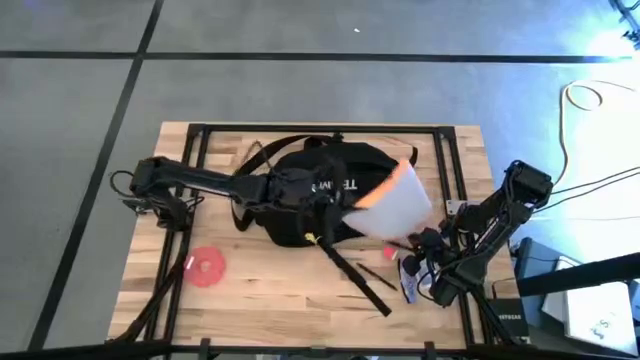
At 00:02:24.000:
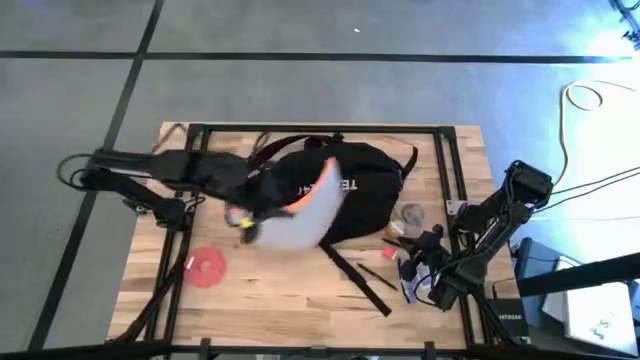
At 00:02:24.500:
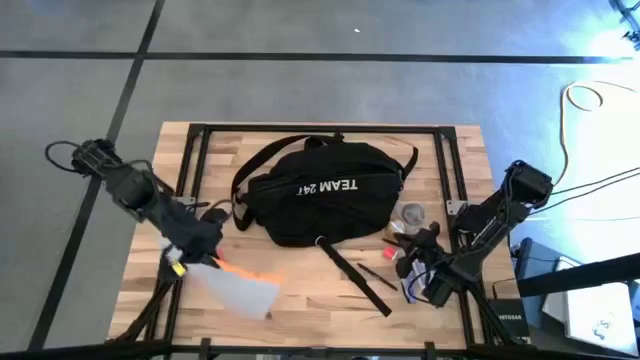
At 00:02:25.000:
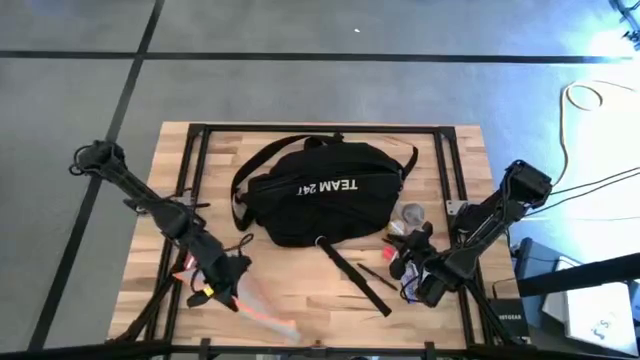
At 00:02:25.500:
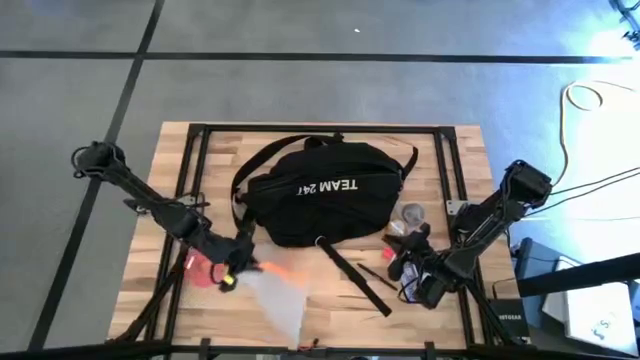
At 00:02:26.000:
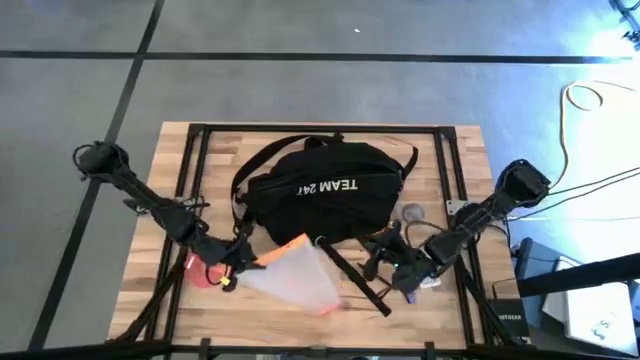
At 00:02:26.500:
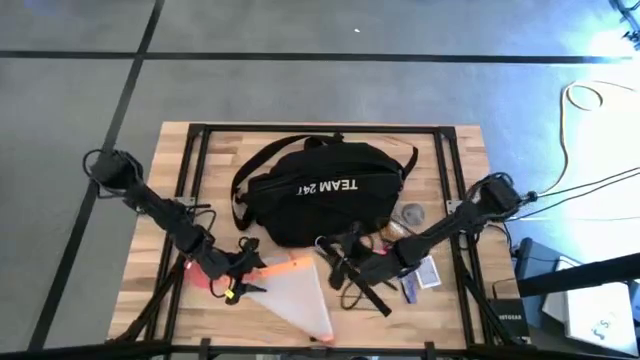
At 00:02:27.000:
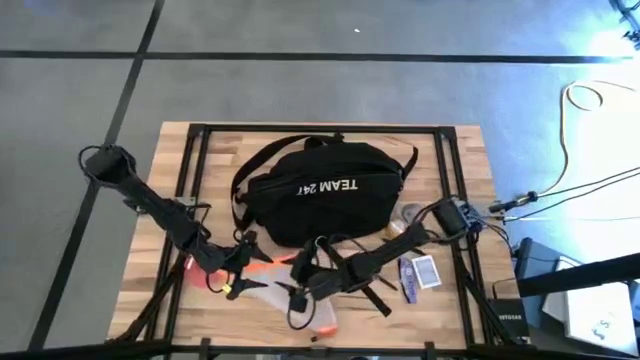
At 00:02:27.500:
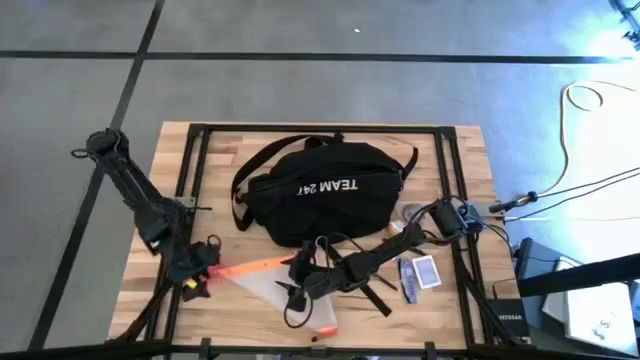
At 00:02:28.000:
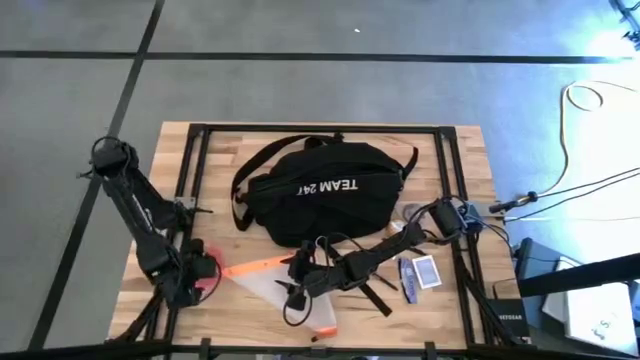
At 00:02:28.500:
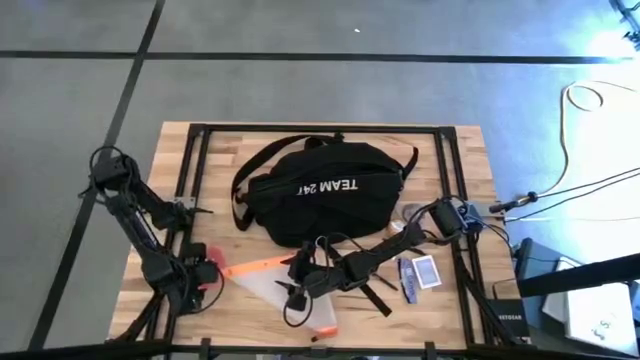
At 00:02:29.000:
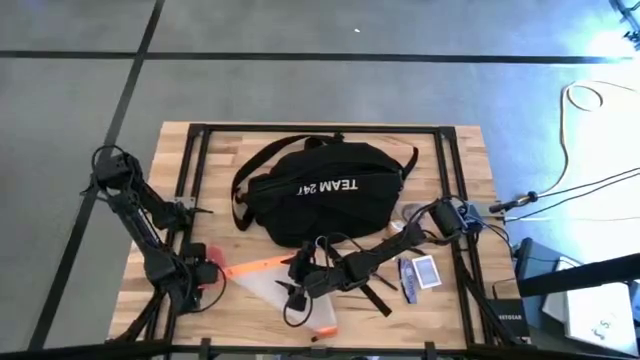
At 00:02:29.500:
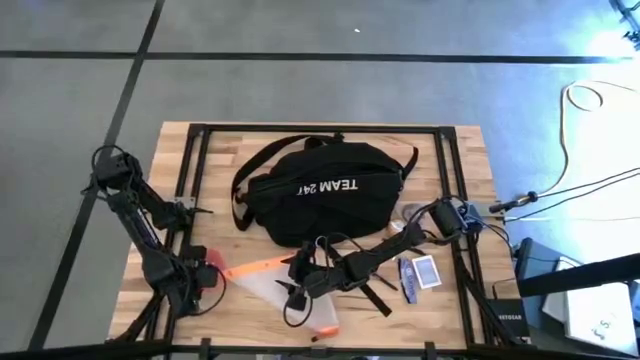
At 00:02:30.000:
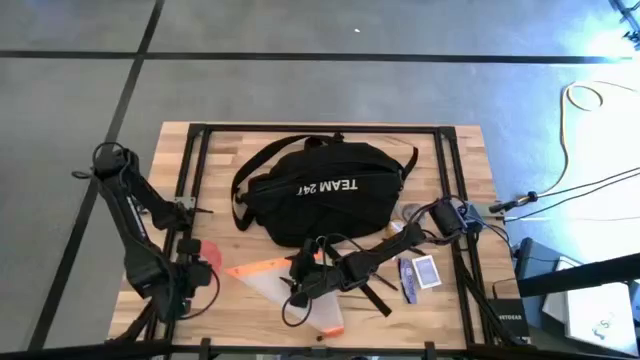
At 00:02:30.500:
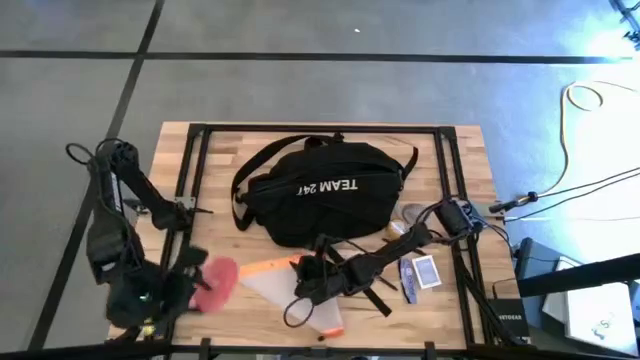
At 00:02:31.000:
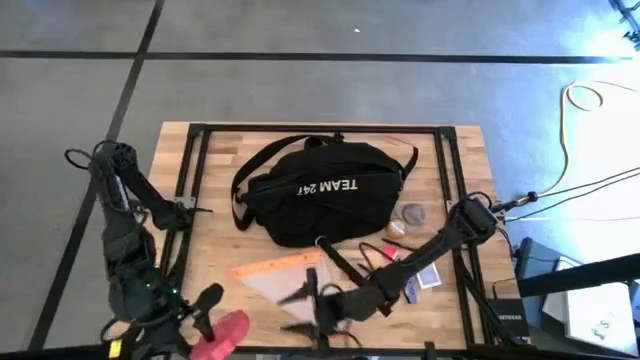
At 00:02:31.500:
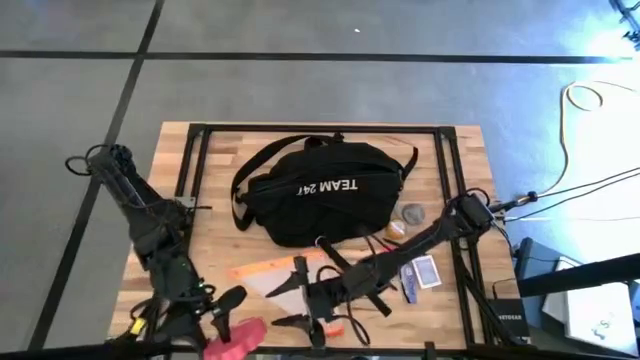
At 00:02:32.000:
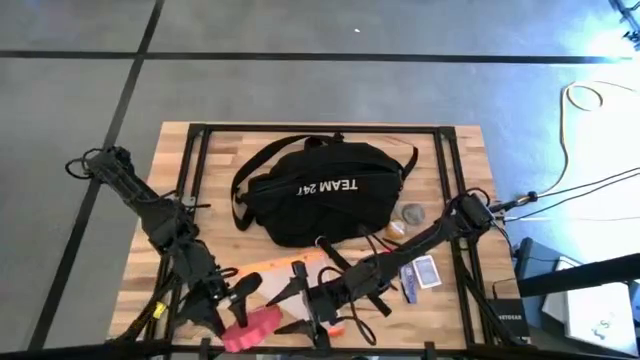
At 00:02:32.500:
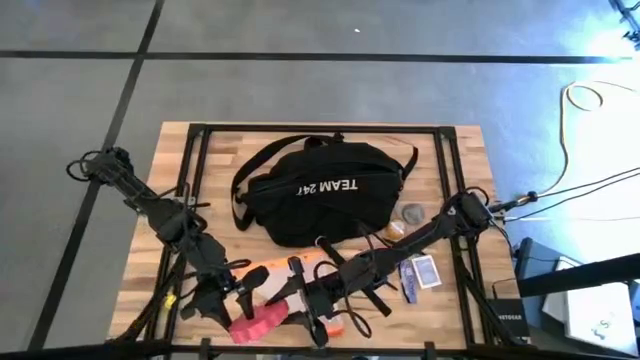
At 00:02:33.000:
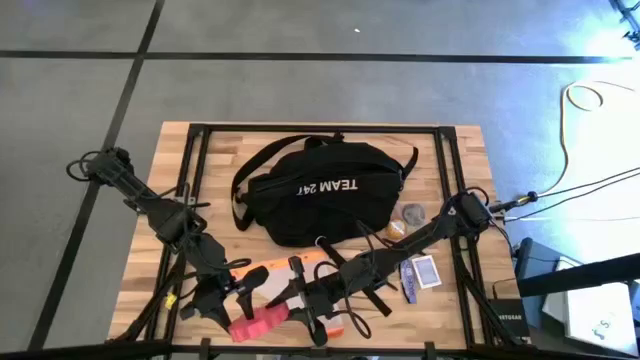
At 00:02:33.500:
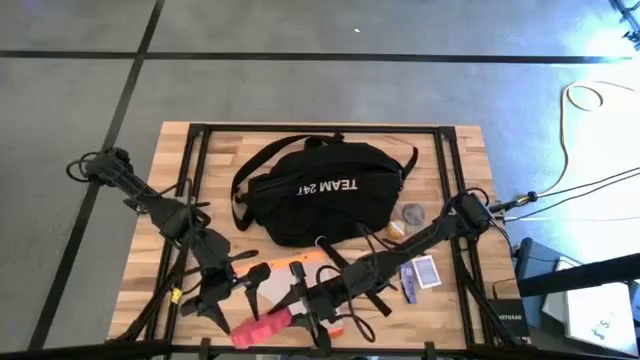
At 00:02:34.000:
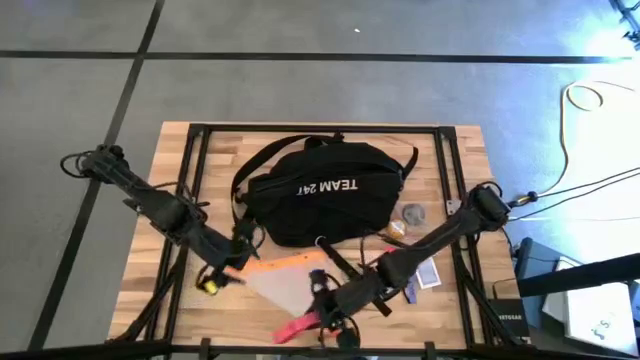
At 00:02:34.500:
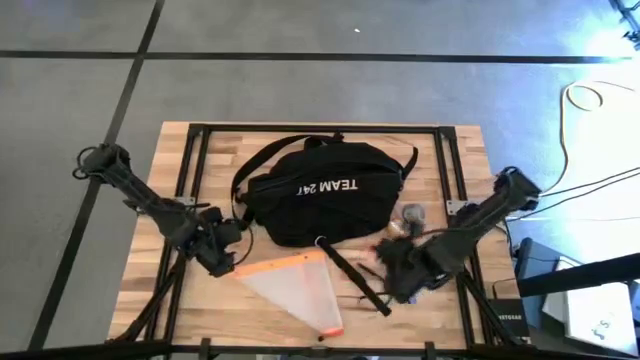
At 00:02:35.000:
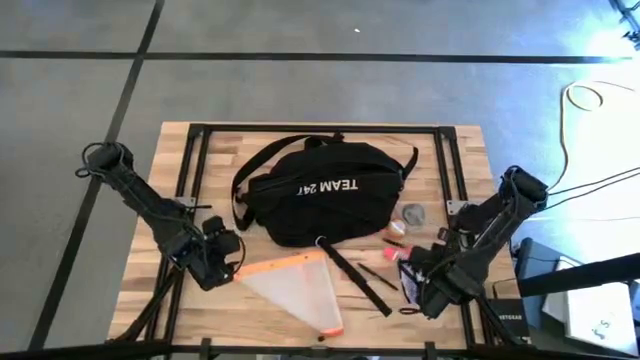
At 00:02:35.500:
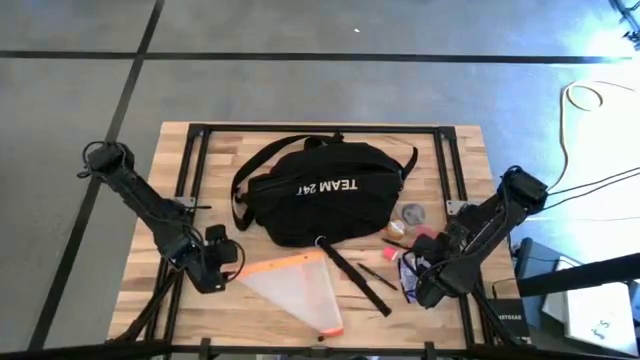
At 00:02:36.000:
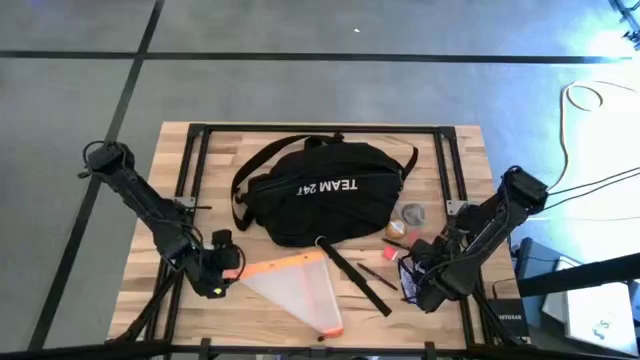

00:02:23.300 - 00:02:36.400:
Task: Unpack backpack
Move the white zip bag at the center of the table

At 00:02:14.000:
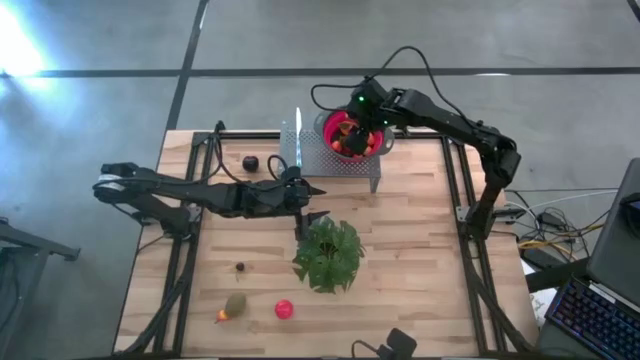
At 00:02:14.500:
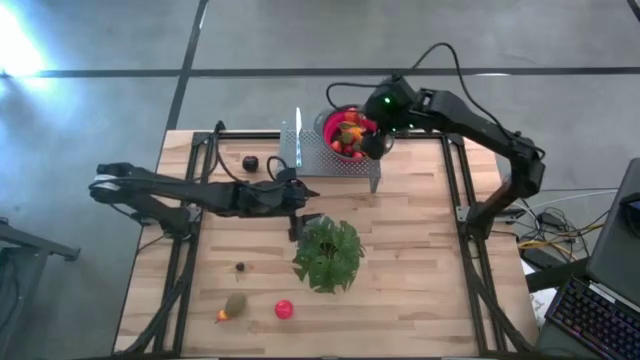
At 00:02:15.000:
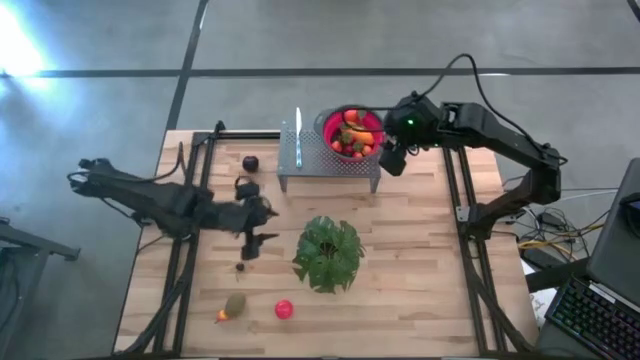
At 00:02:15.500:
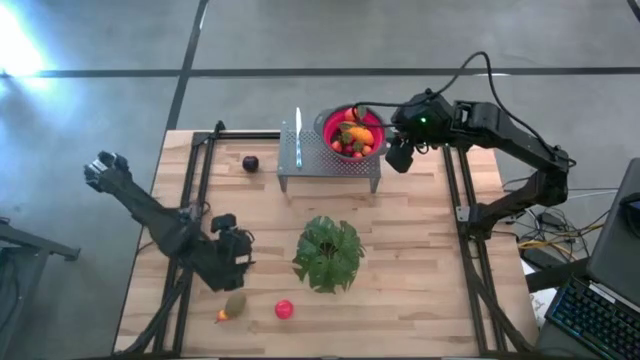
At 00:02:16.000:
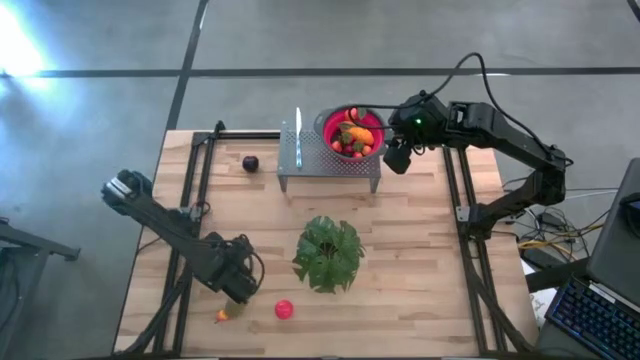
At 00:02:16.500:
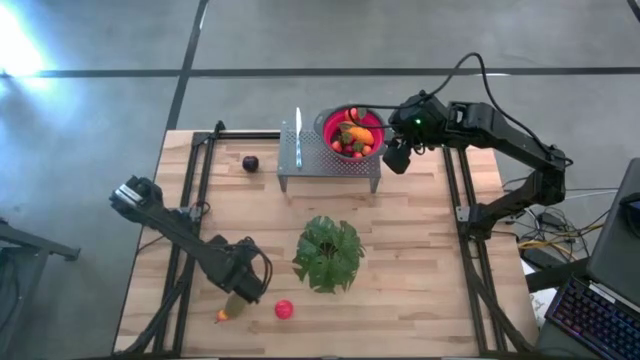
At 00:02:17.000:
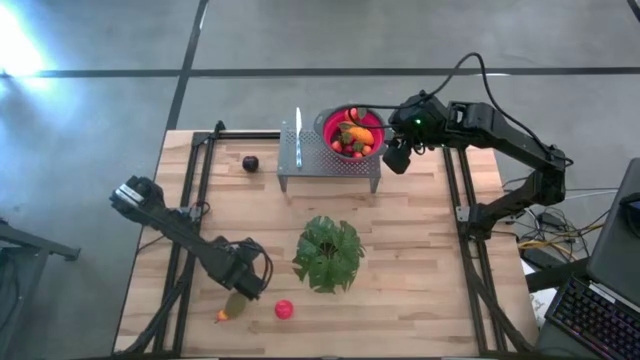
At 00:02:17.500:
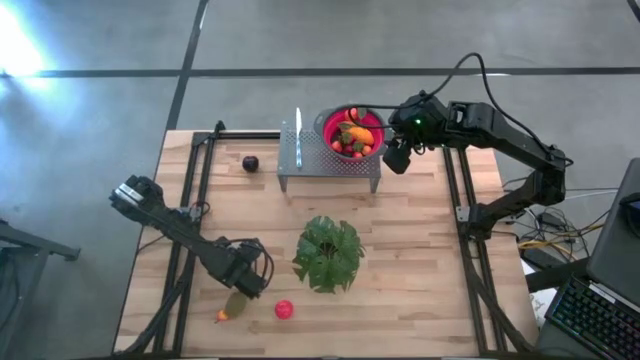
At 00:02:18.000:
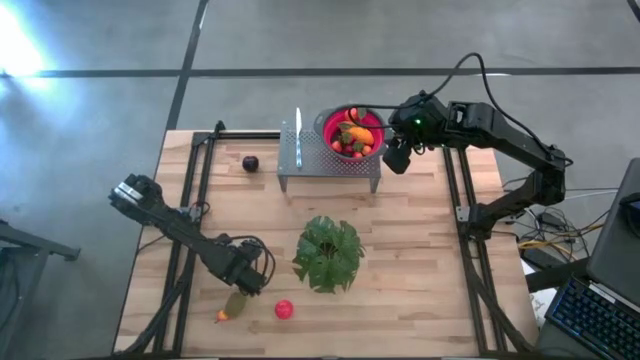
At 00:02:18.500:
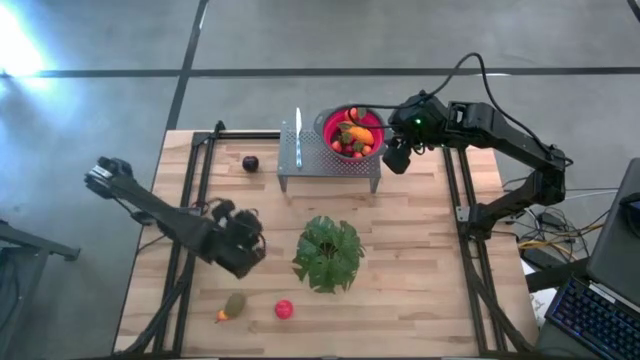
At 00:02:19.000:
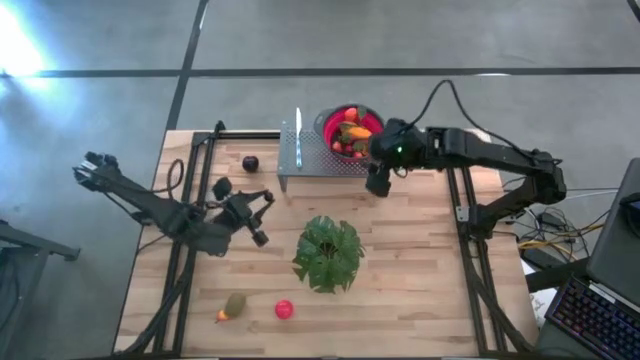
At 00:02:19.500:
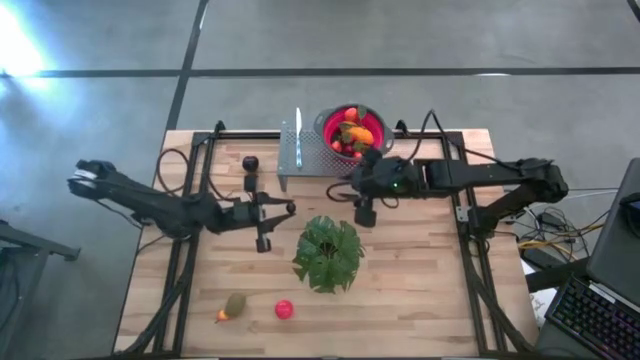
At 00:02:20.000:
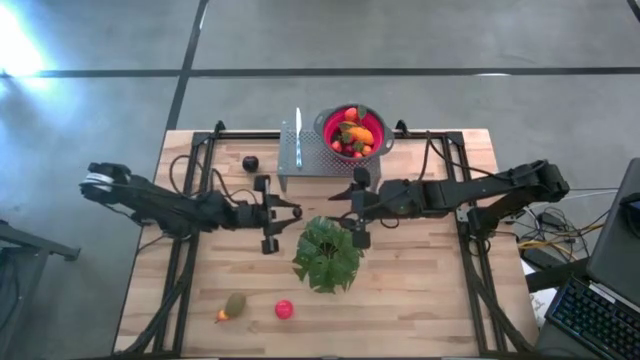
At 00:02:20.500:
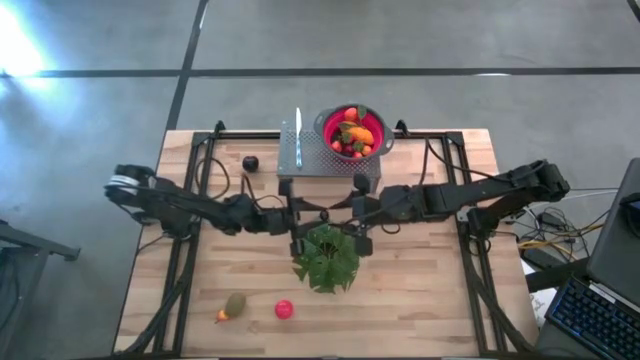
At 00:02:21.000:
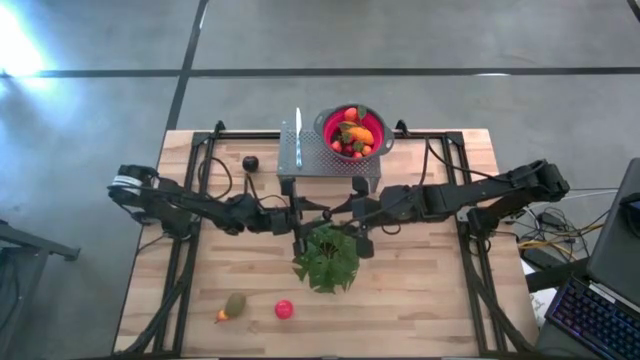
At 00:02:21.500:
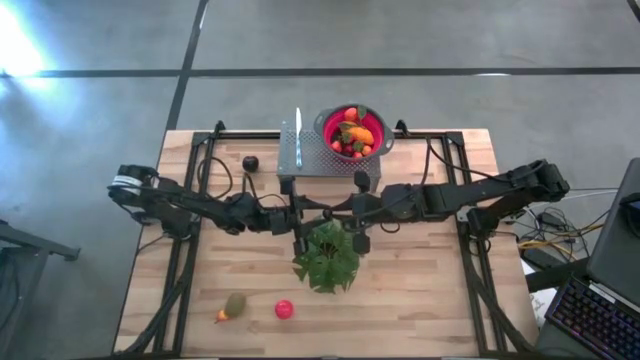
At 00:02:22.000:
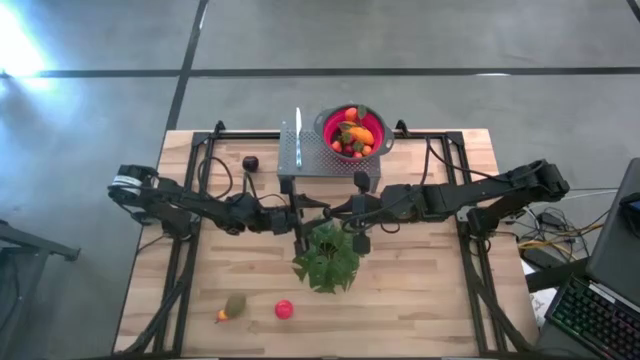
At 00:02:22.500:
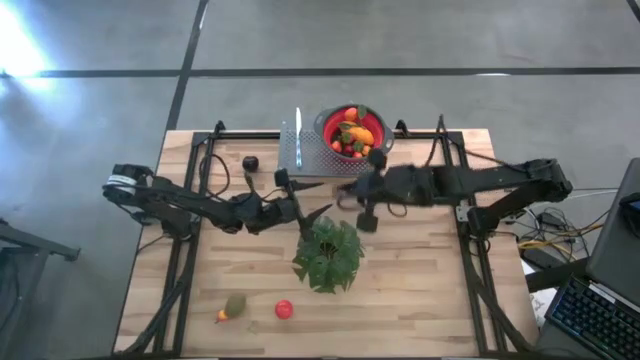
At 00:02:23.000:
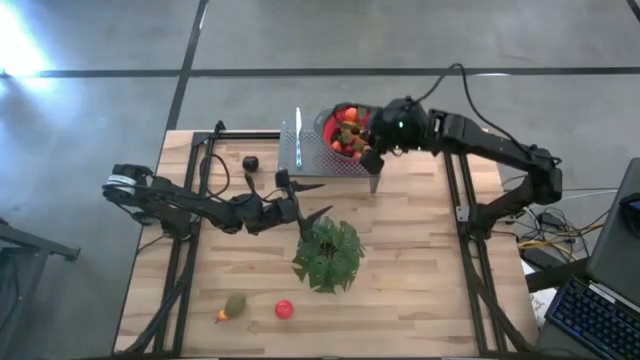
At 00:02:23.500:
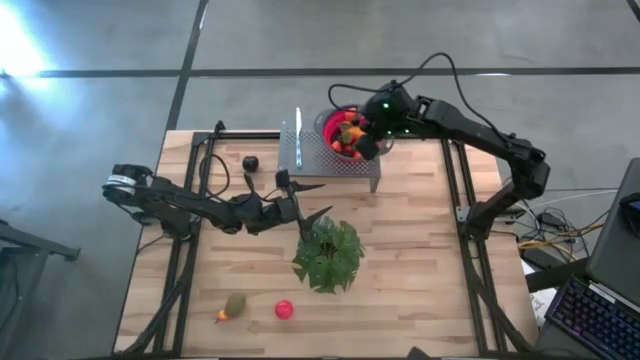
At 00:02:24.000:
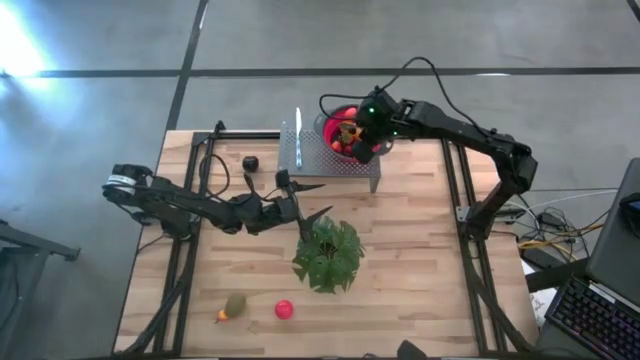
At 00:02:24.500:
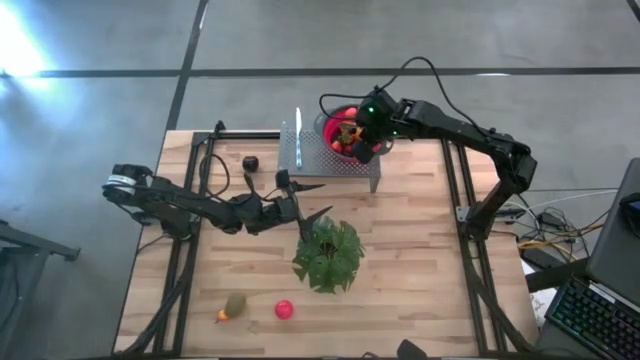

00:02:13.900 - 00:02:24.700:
Task: Pick & Place Fruit
Put the black cherry into the red strainer bowl on the shelf
